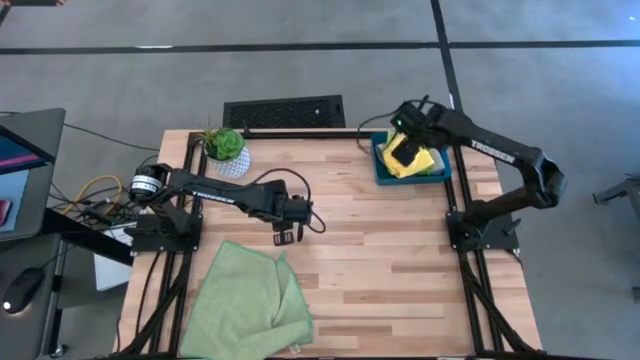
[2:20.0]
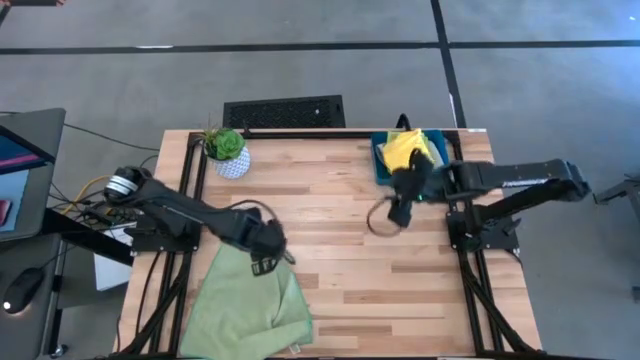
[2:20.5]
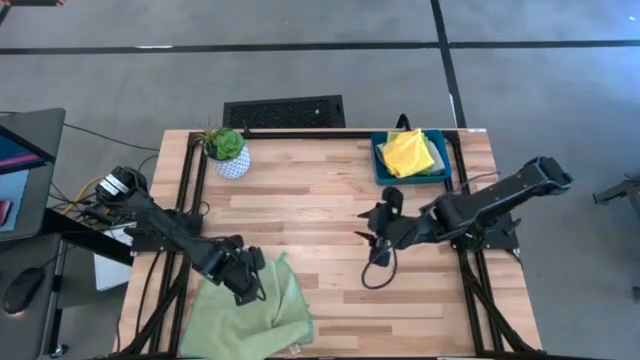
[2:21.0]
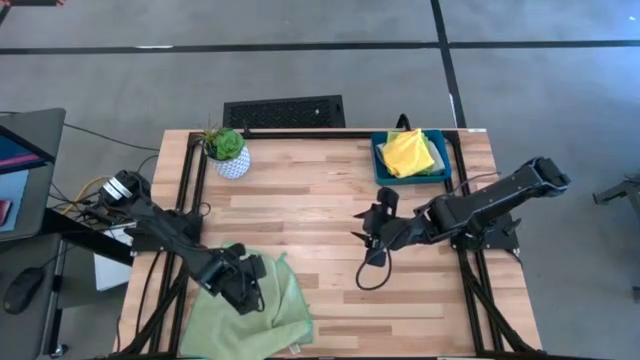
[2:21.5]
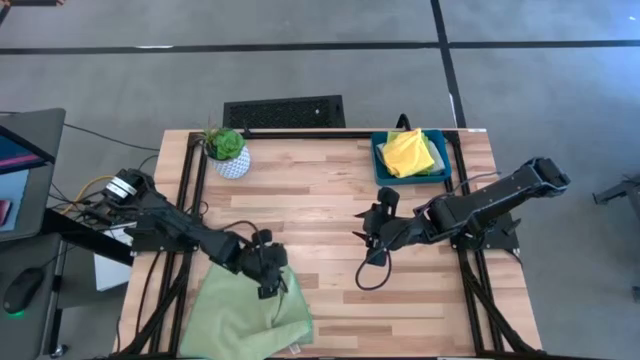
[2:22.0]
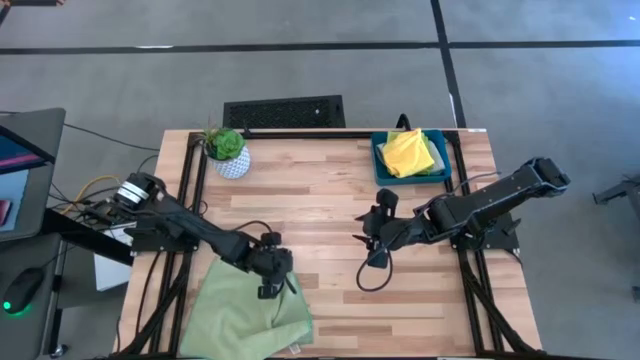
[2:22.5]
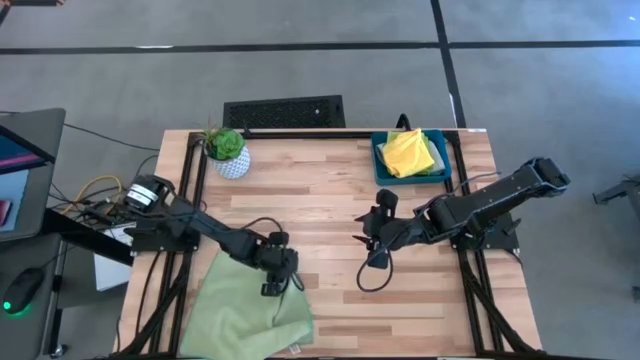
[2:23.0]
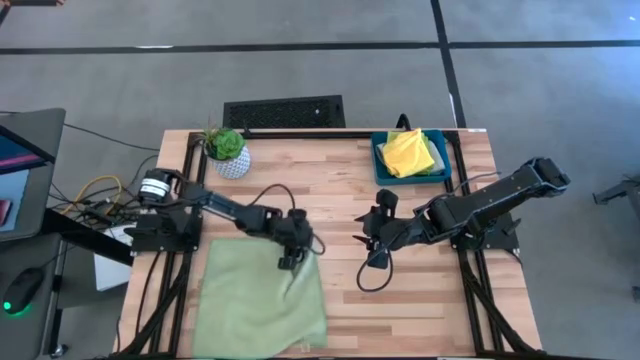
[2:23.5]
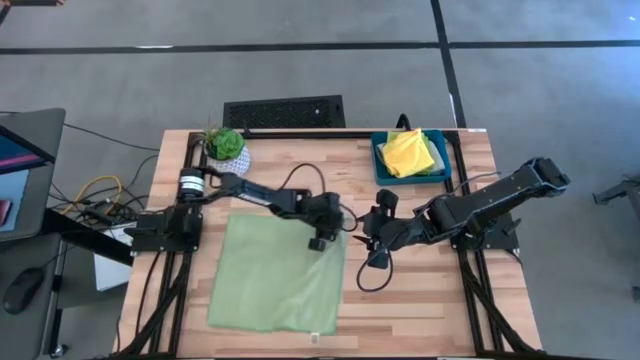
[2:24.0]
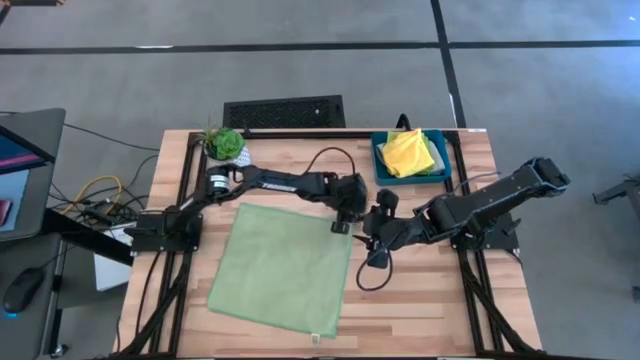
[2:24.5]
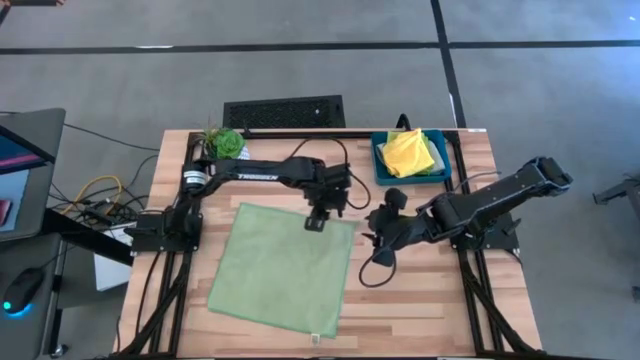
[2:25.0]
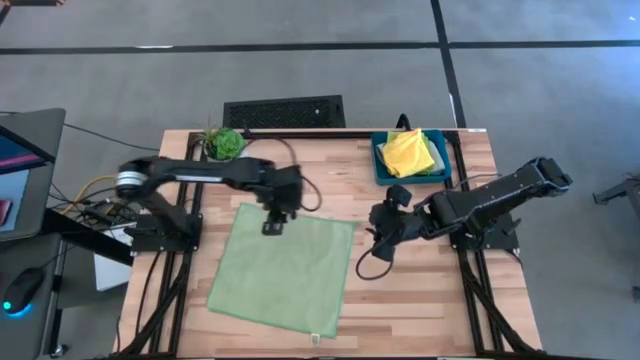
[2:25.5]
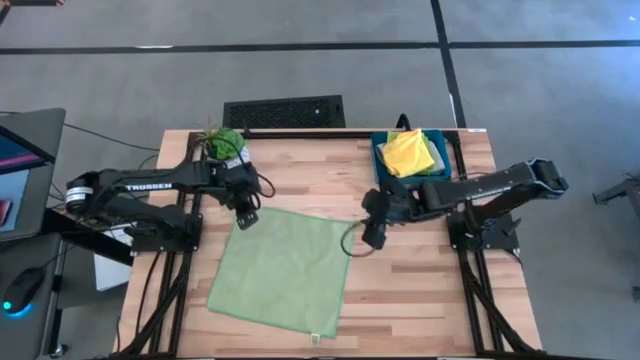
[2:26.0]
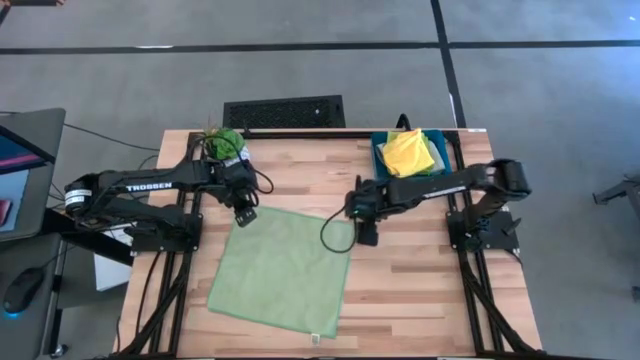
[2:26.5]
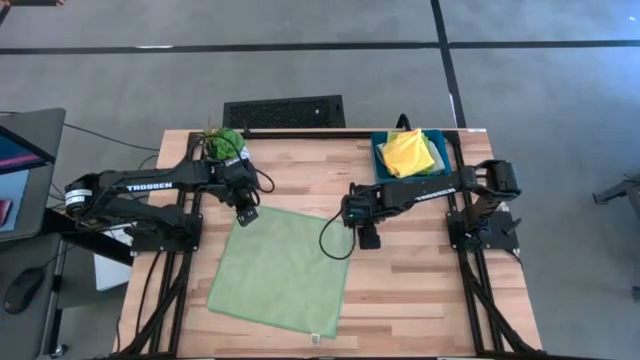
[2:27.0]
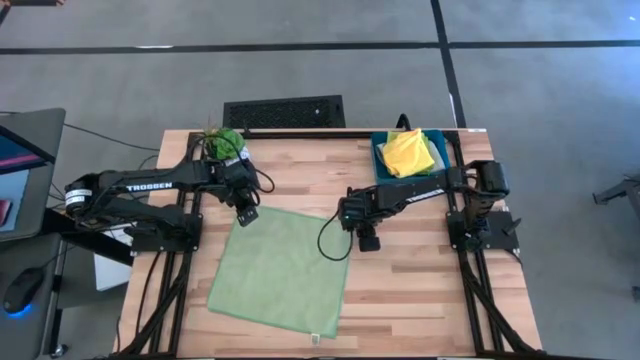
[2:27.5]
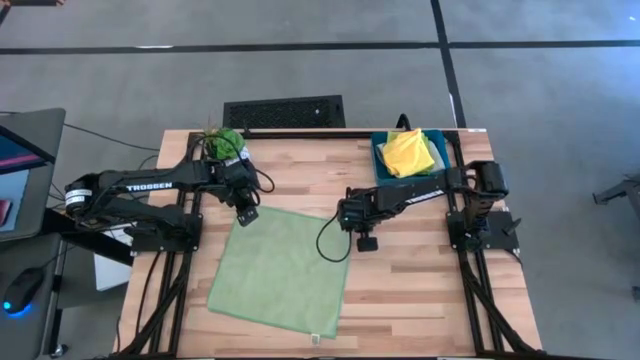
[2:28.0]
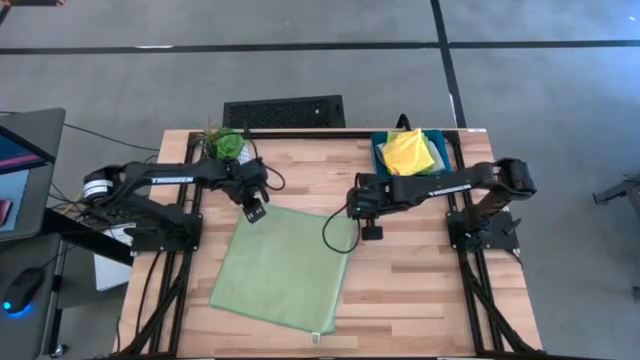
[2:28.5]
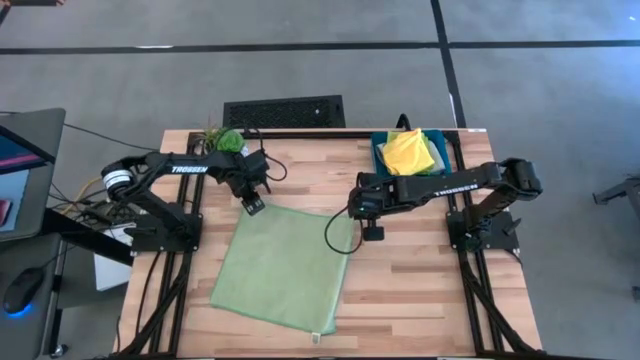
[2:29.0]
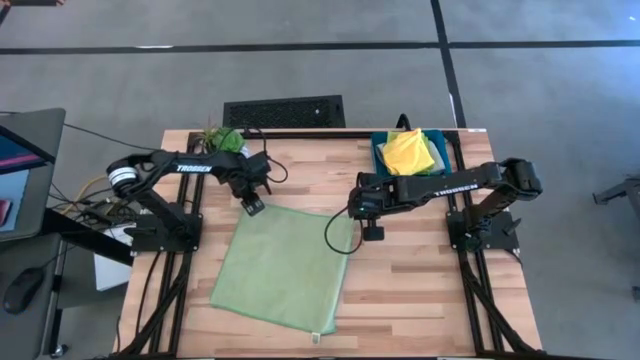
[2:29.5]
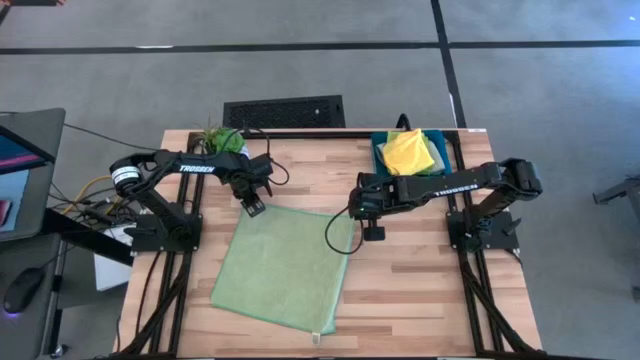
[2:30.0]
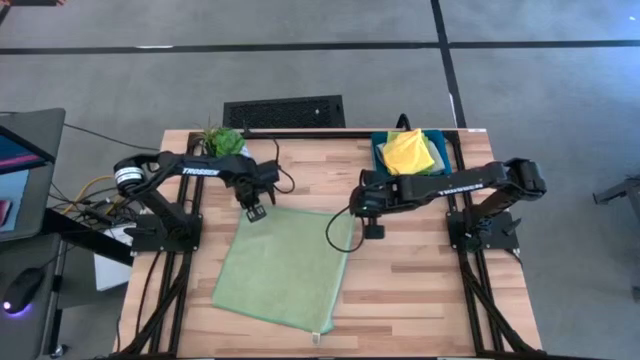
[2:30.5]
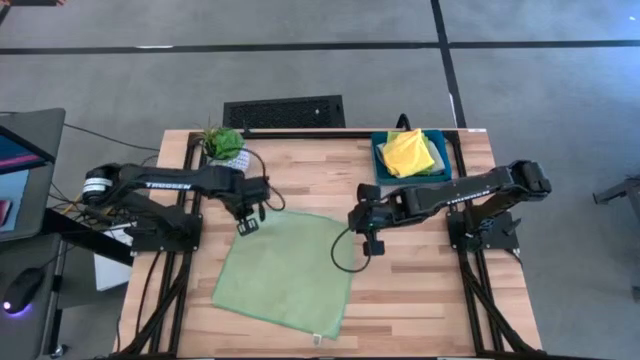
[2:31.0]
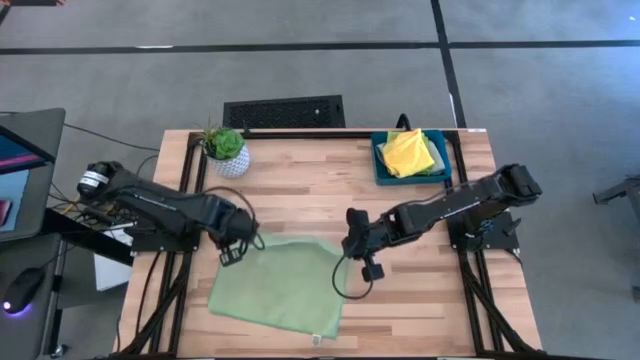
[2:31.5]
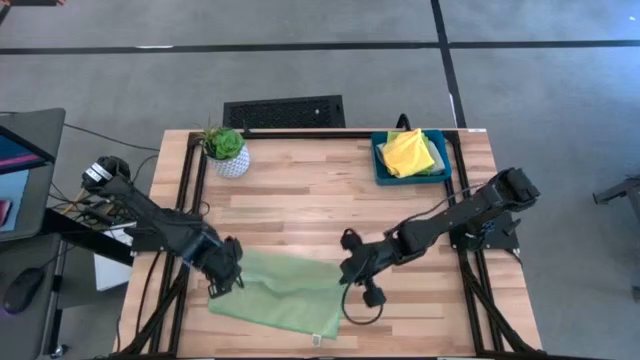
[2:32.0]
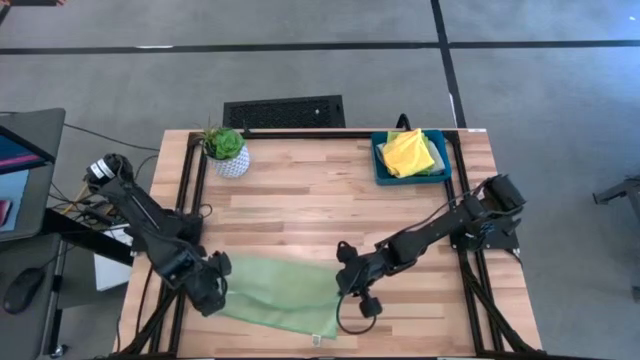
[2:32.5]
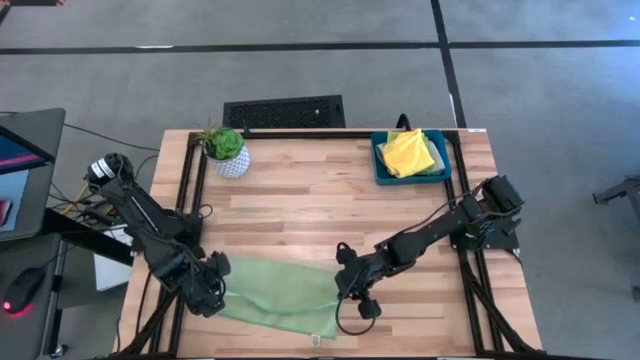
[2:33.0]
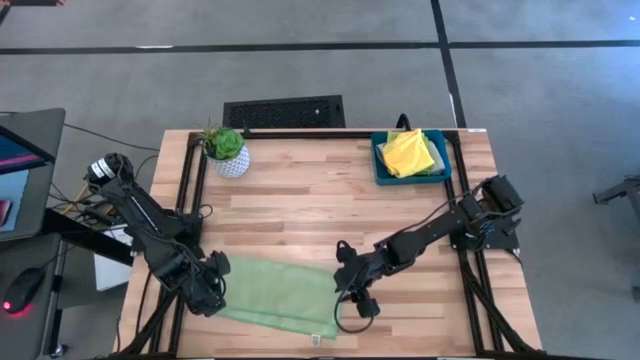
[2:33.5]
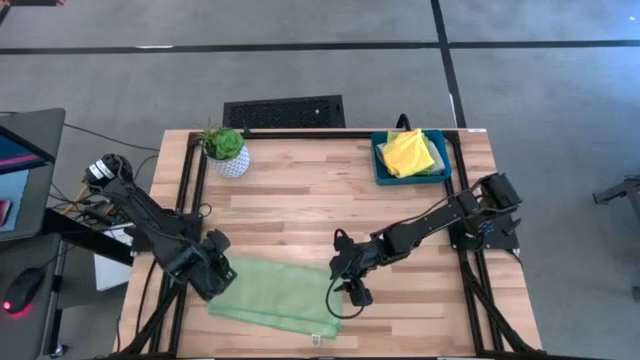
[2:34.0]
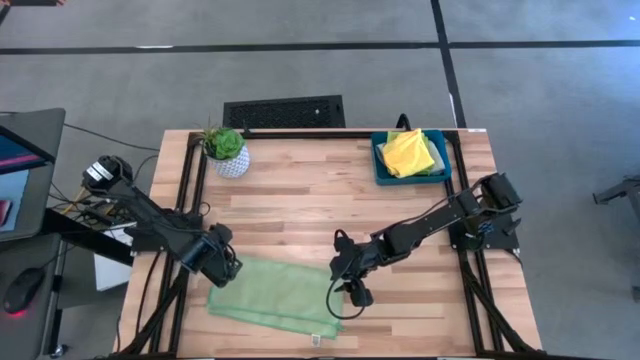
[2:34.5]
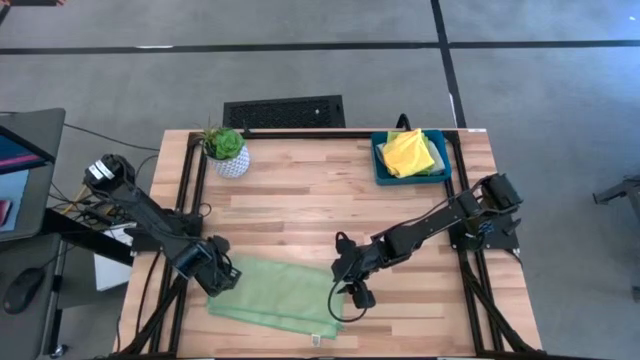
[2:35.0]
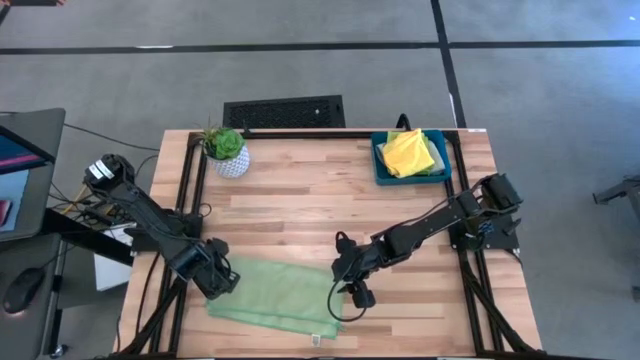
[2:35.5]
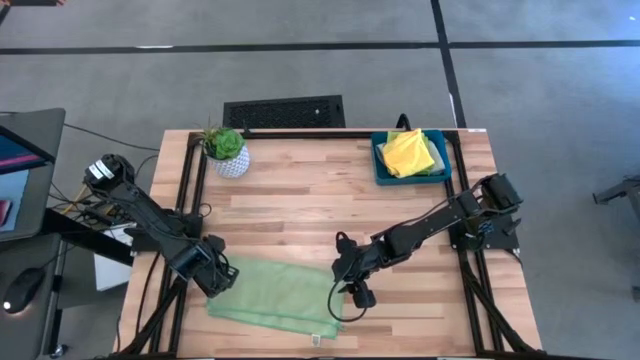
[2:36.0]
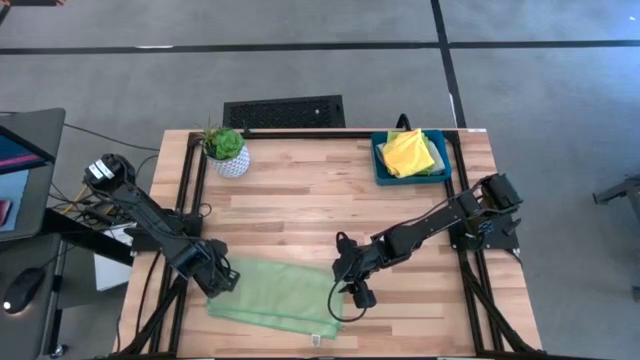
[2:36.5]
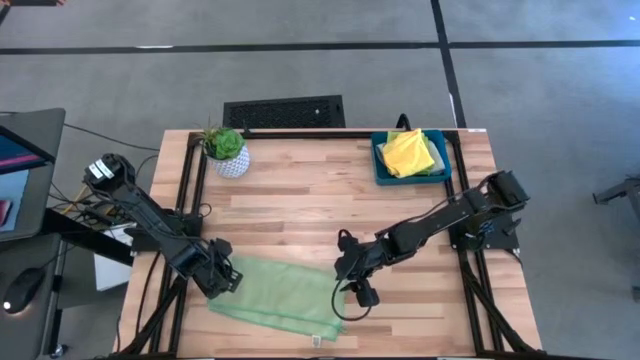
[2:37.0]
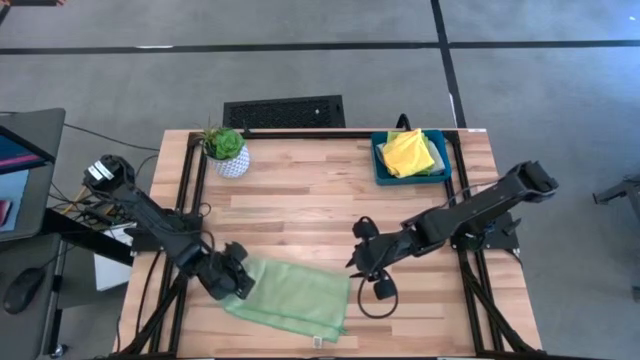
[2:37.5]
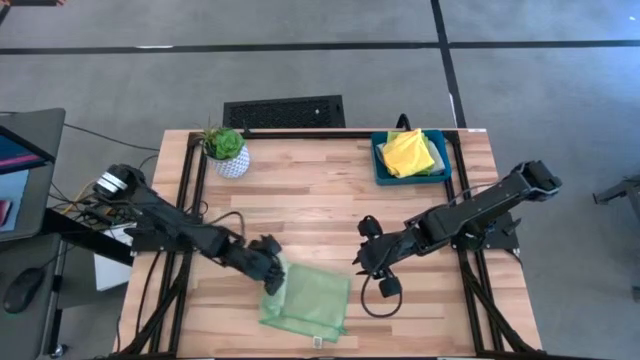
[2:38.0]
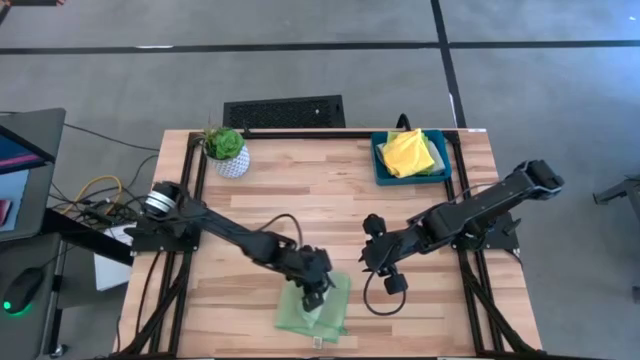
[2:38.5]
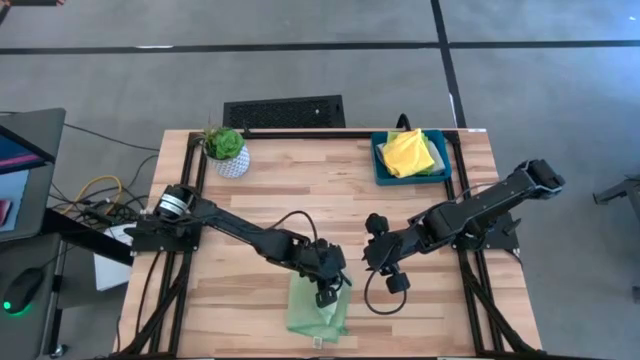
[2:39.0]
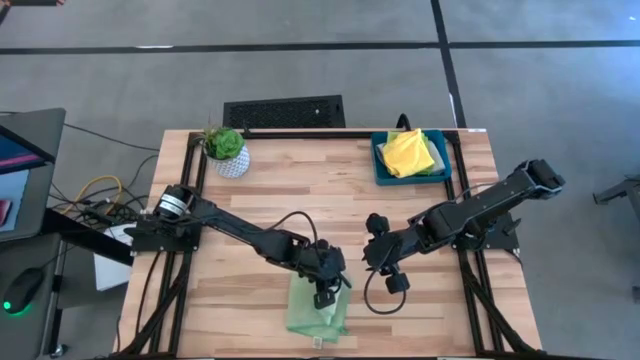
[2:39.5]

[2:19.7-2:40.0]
Task: Fold microfiber towels
Fold the green microfiber towel

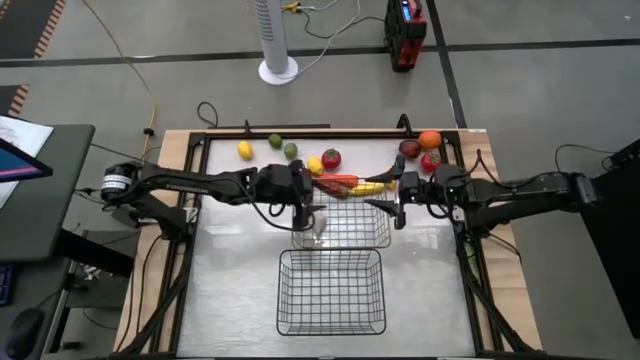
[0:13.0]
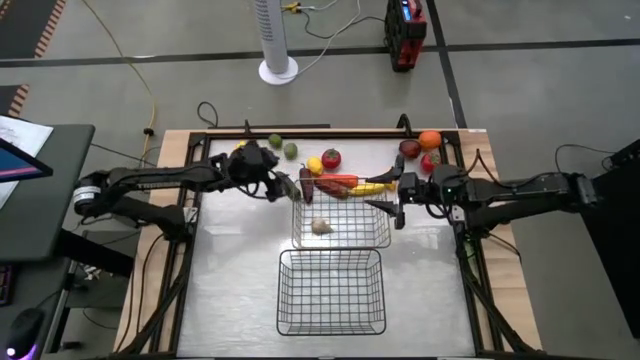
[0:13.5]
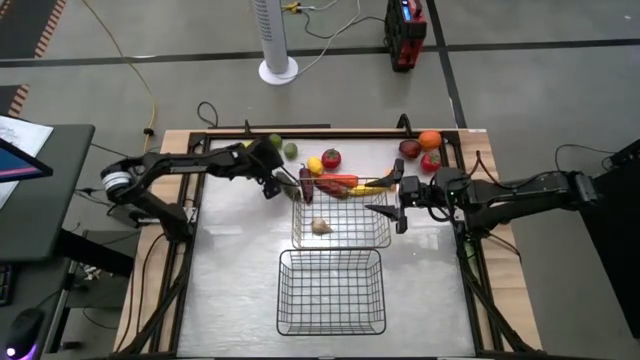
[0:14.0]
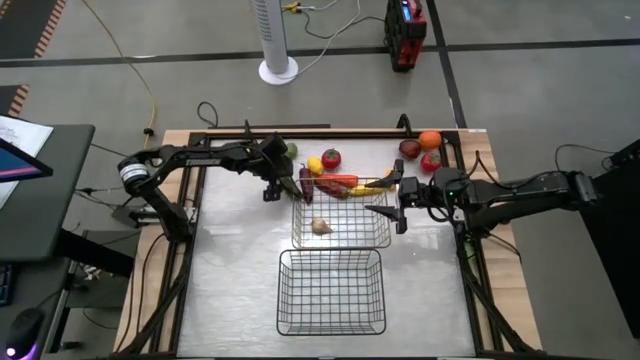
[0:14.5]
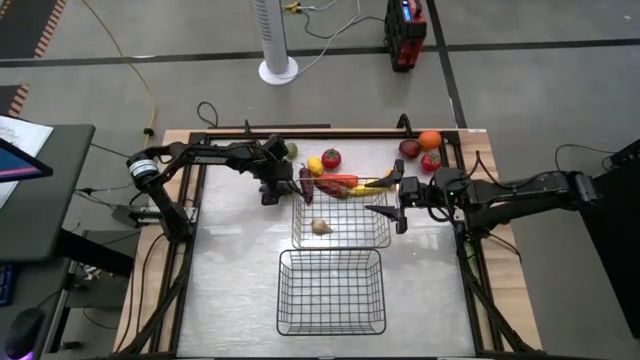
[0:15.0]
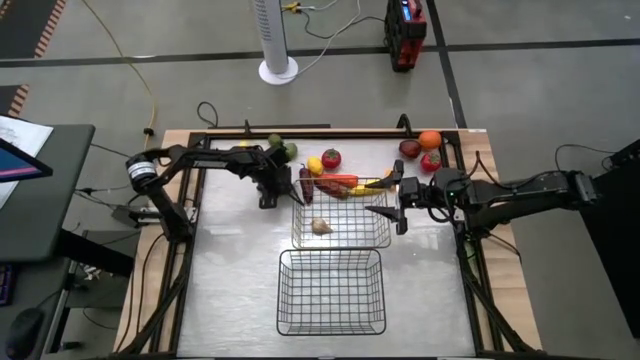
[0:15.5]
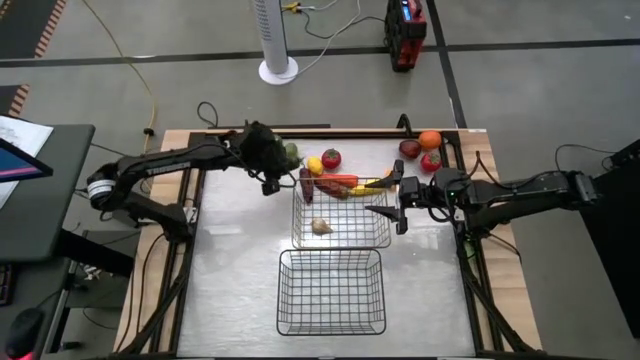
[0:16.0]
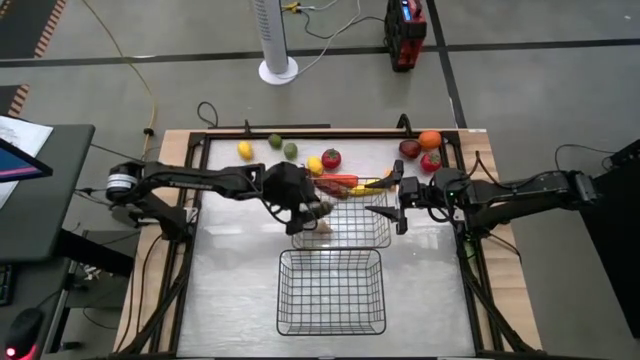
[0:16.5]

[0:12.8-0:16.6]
Task: Sort produce into baskets
Put the green chili pepper into the top wire basket
